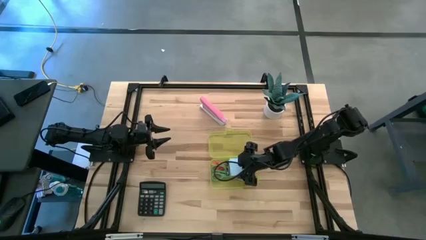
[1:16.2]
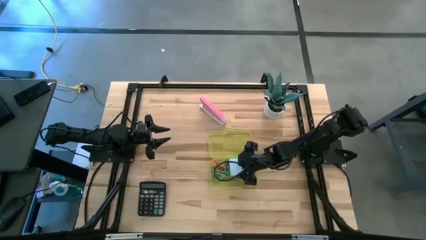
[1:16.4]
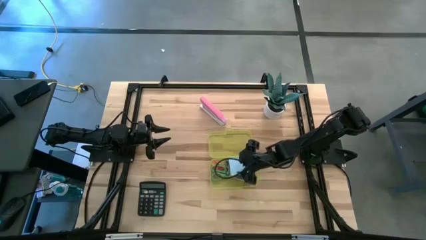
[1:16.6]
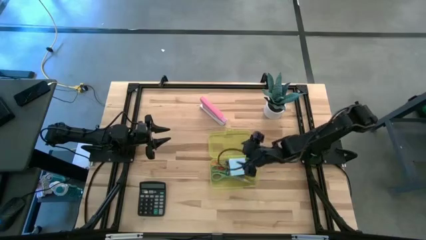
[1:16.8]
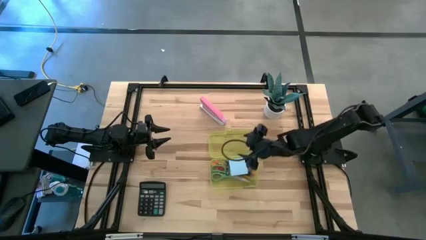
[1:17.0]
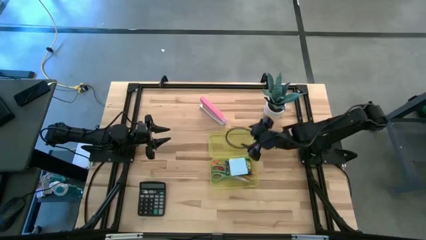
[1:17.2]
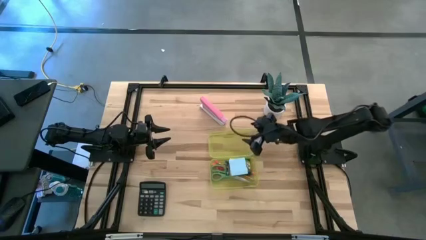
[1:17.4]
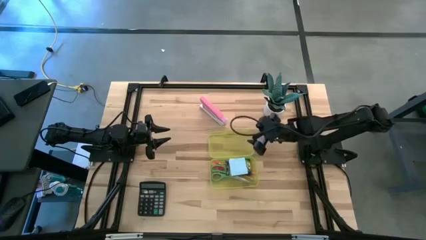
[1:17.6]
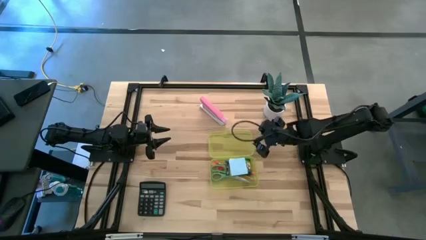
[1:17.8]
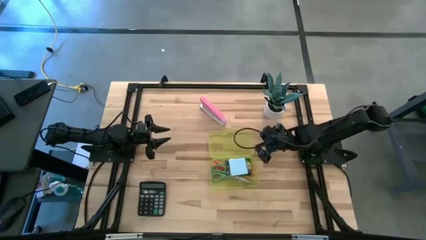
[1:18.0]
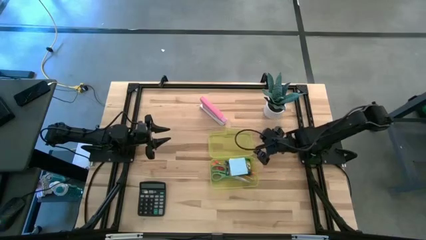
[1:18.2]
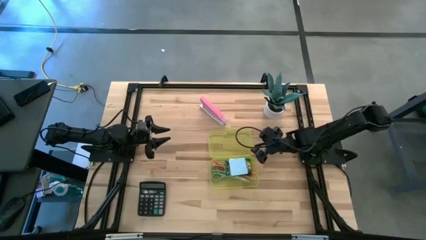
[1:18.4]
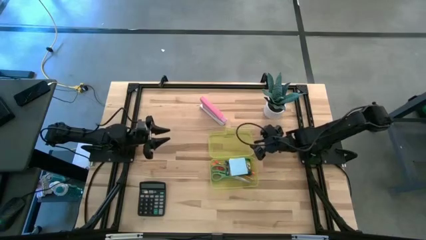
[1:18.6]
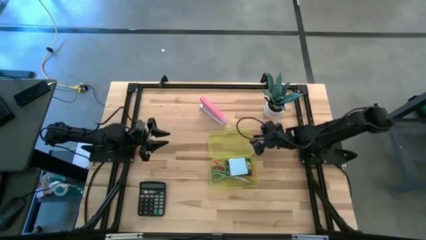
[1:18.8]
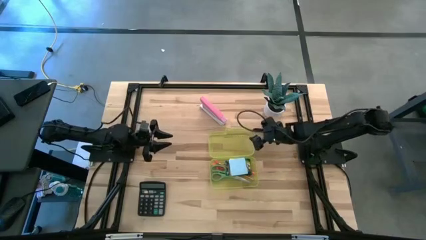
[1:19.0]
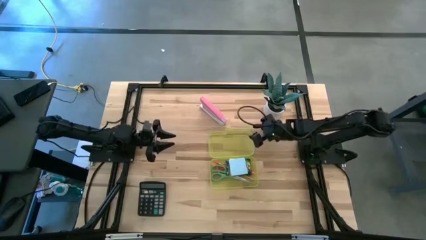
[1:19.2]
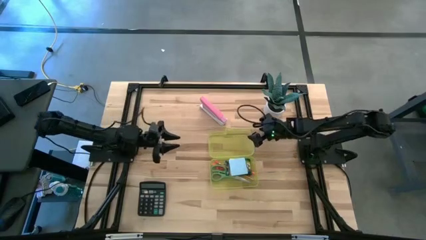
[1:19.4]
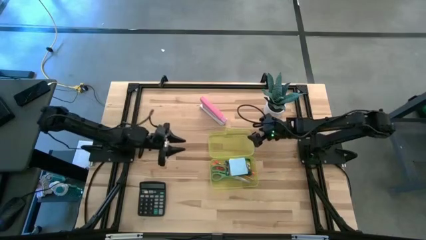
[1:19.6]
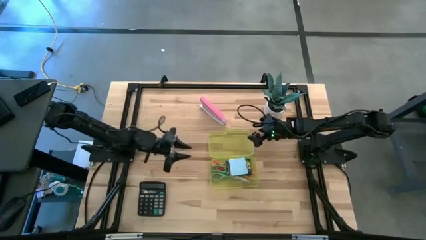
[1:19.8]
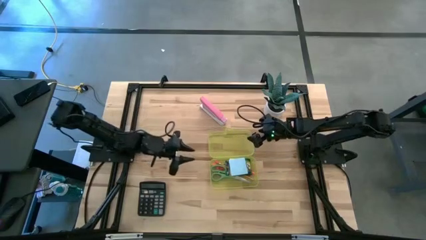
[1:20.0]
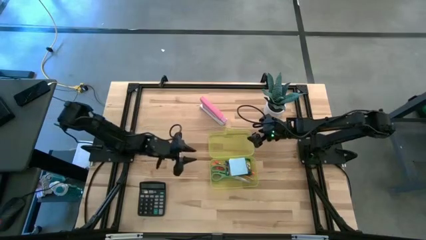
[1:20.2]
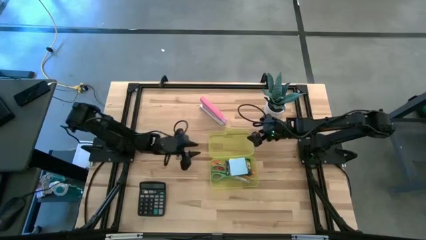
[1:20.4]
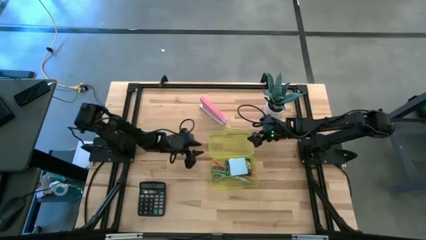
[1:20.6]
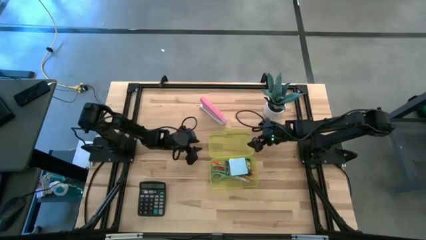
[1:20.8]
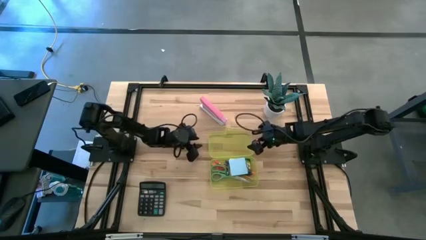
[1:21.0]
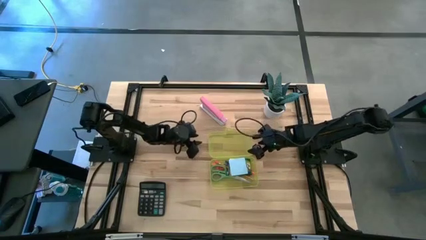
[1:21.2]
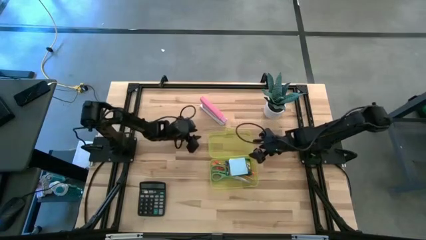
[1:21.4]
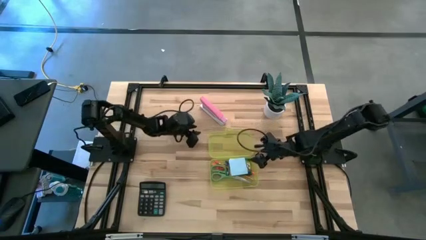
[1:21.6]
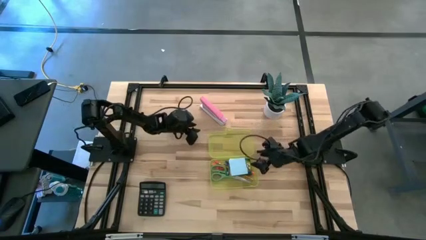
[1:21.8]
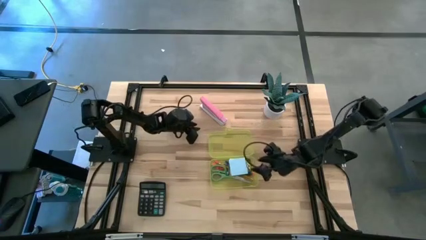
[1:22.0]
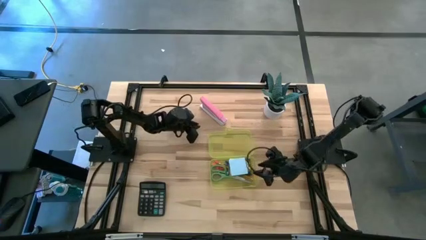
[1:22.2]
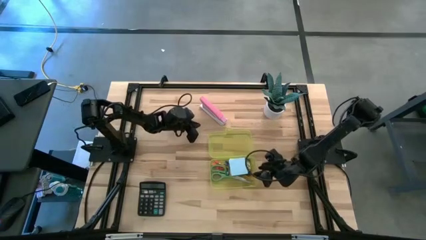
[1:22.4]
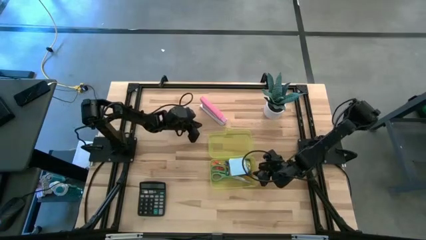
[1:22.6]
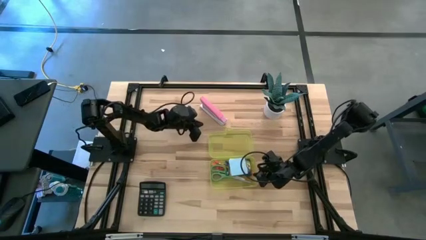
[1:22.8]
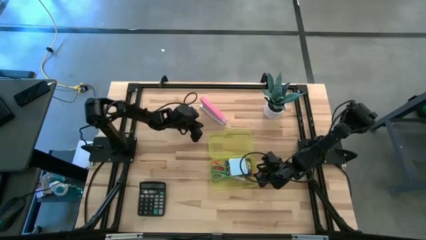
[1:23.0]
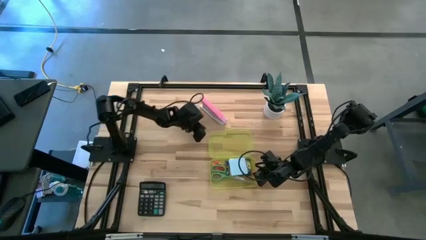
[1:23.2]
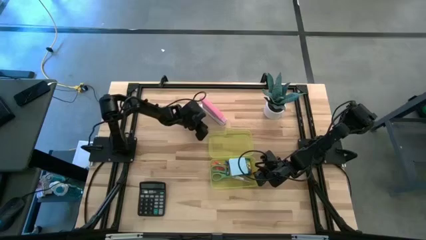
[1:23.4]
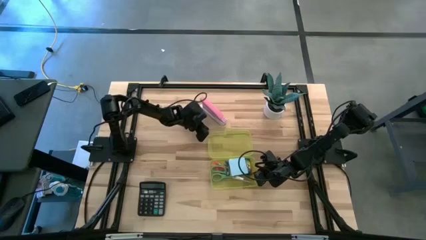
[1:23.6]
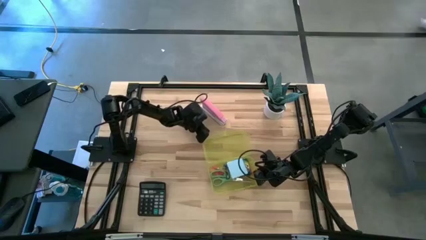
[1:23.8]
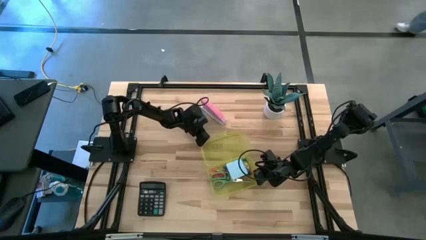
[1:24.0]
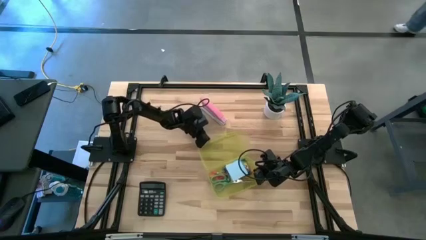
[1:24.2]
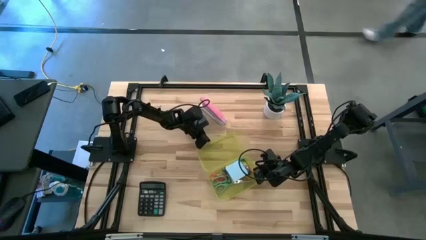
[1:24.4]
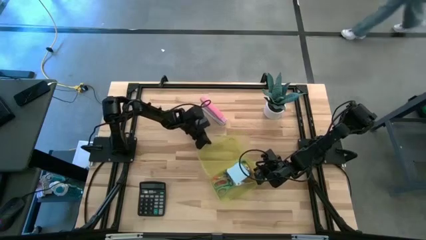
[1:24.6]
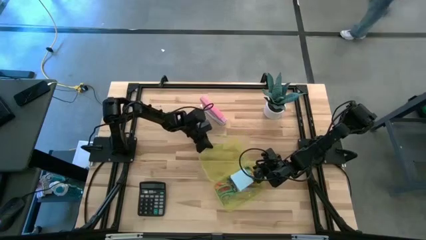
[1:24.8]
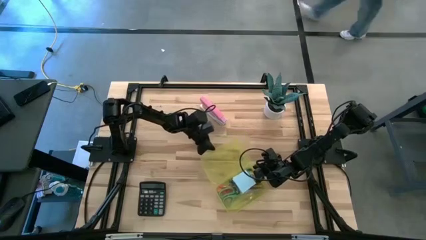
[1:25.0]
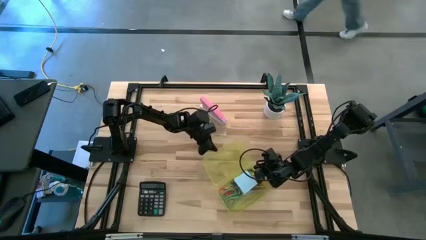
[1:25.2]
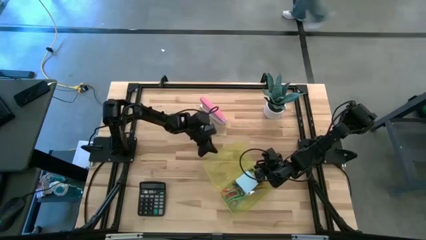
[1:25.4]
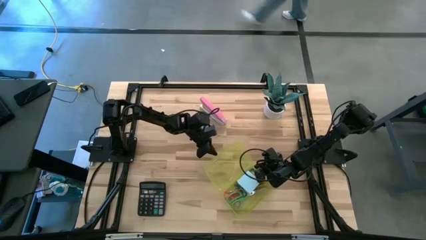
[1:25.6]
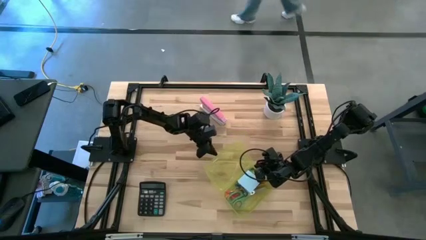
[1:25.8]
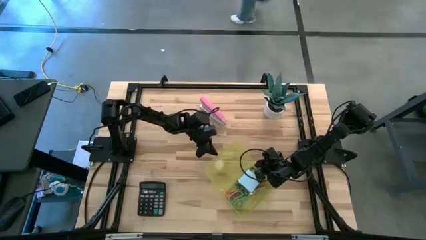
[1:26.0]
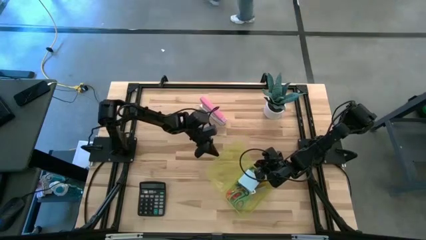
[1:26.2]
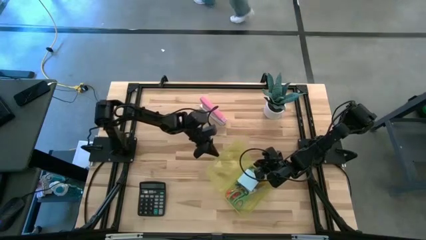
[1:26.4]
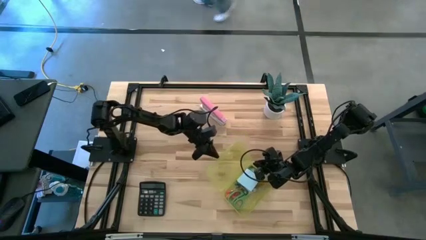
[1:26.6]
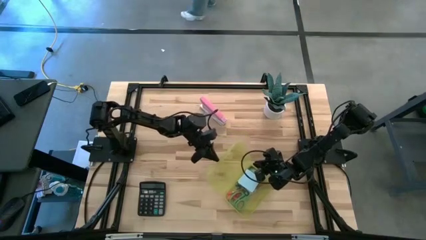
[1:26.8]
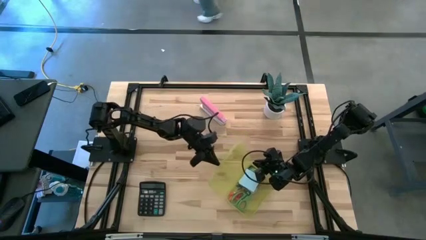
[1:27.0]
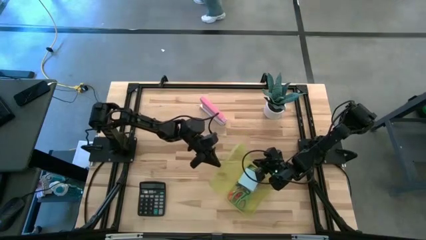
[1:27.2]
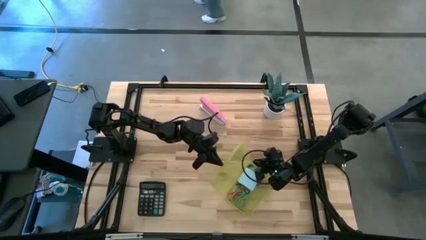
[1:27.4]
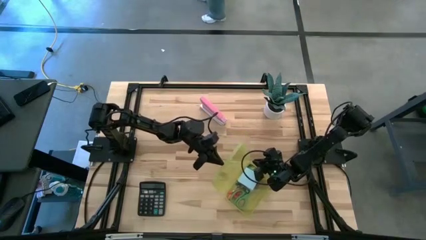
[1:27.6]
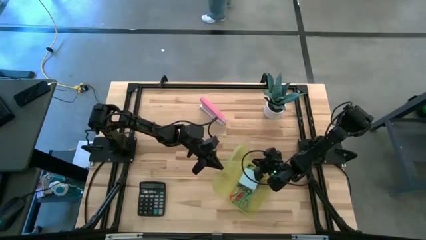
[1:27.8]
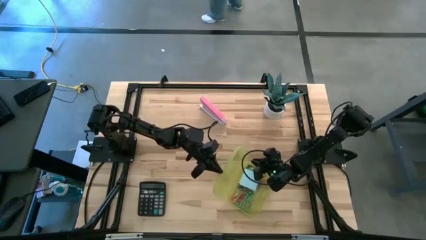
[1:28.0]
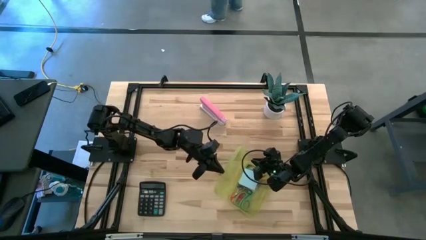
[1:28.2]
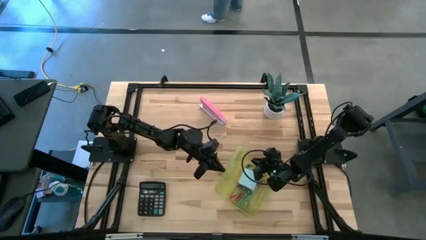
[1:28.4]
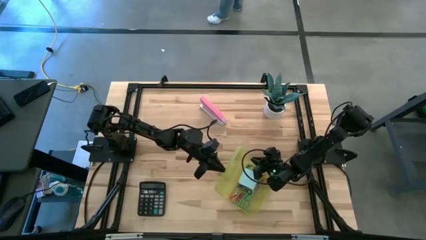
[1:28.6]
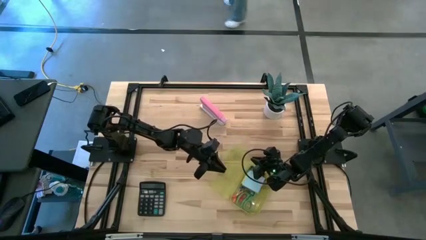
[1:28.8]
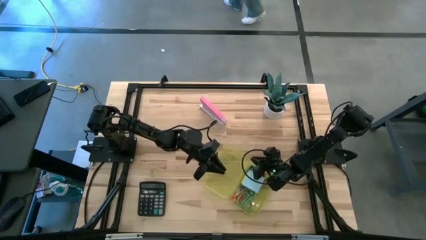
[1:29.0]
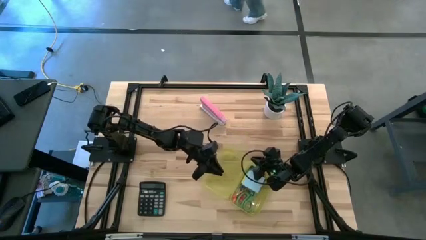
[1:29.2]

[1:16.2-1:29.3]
Task: Pack school essentials
Close the yellow supply box
